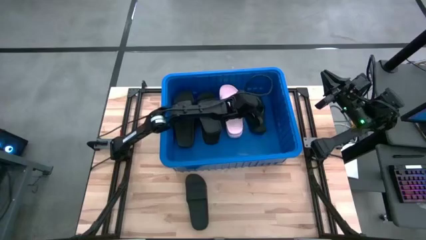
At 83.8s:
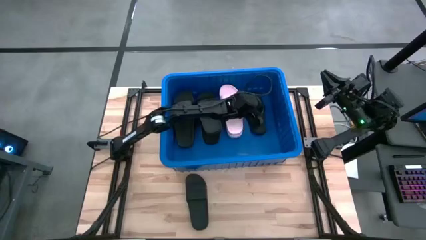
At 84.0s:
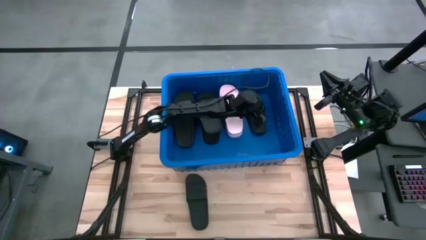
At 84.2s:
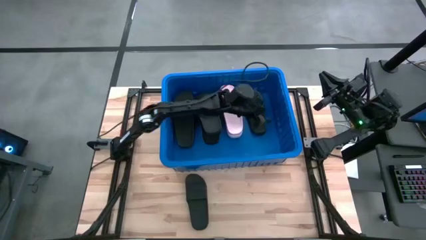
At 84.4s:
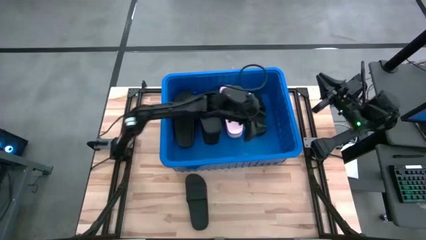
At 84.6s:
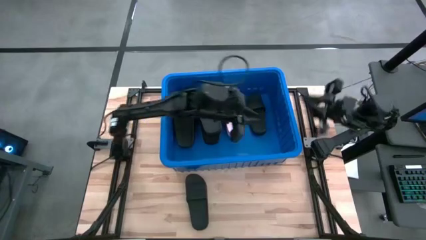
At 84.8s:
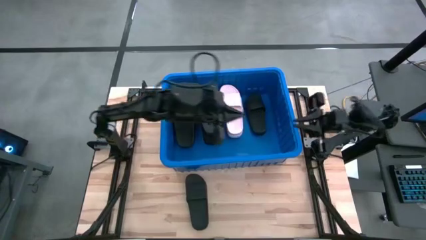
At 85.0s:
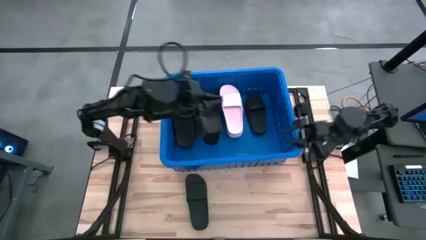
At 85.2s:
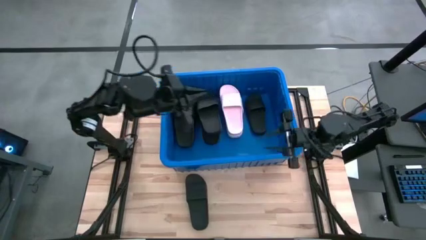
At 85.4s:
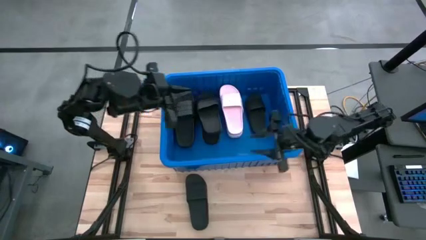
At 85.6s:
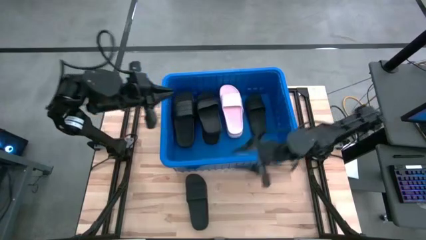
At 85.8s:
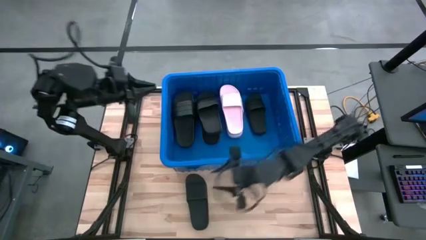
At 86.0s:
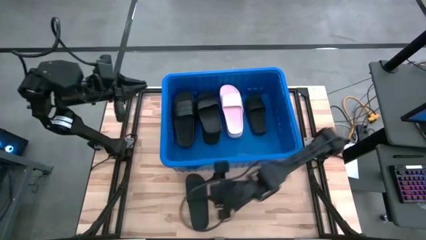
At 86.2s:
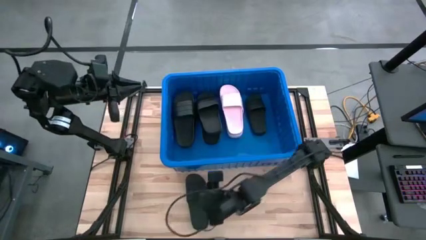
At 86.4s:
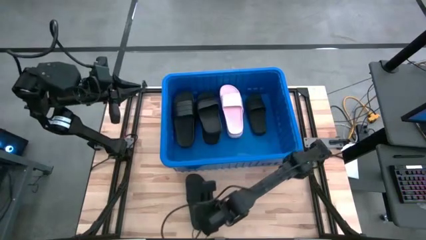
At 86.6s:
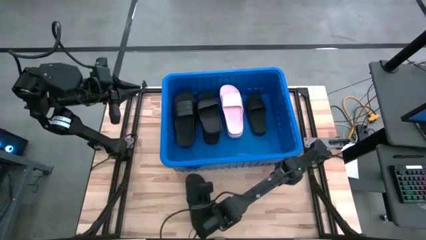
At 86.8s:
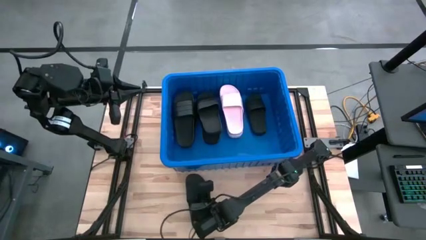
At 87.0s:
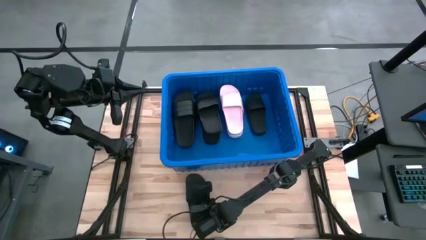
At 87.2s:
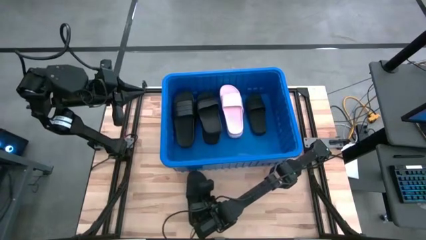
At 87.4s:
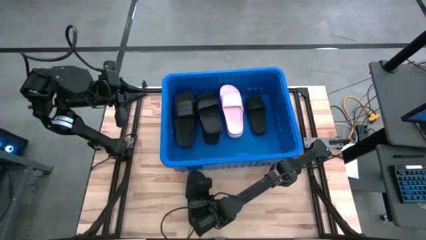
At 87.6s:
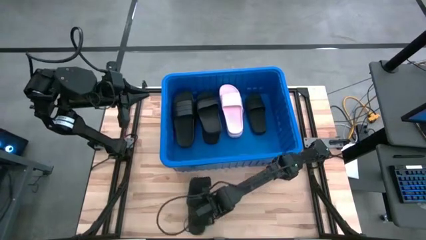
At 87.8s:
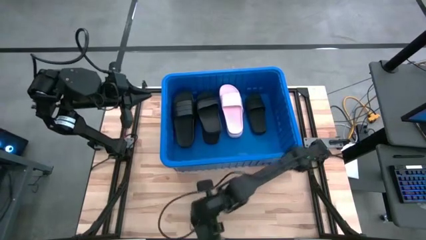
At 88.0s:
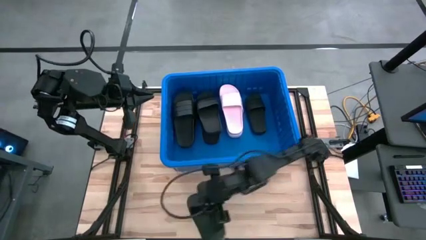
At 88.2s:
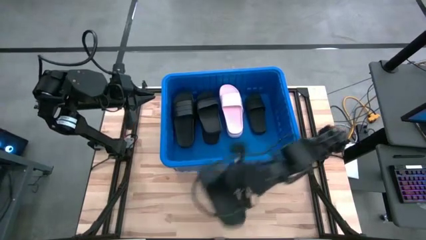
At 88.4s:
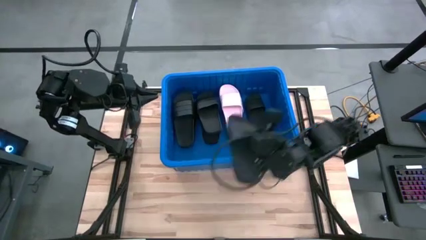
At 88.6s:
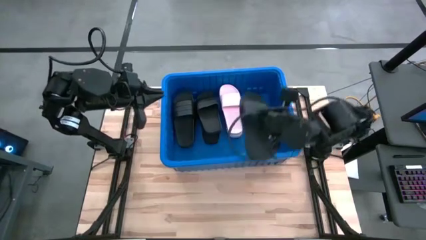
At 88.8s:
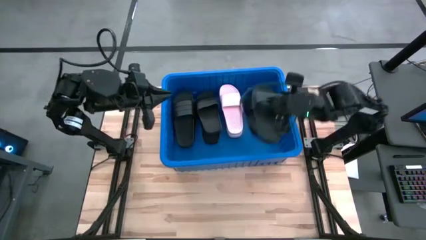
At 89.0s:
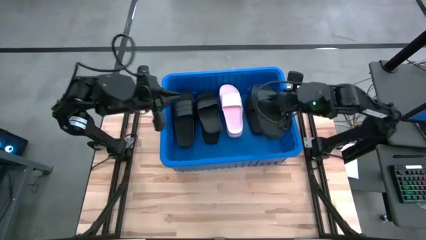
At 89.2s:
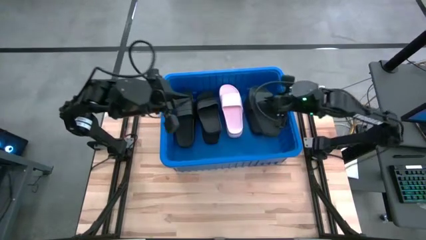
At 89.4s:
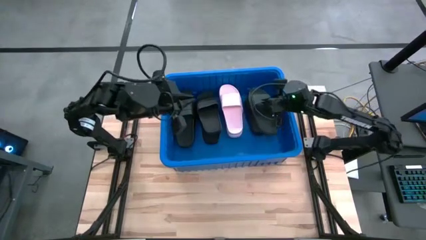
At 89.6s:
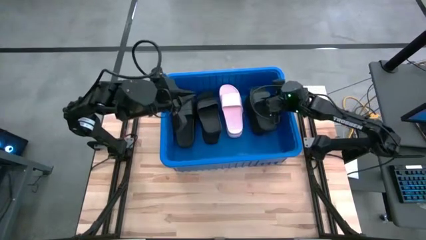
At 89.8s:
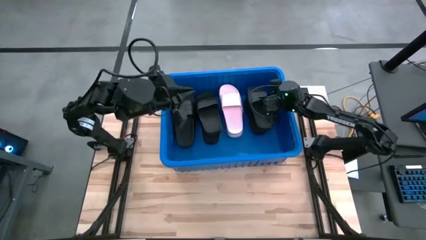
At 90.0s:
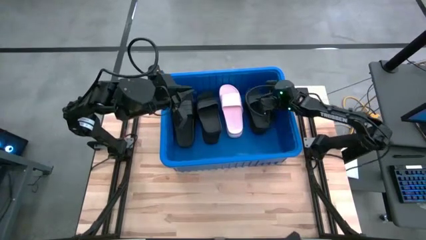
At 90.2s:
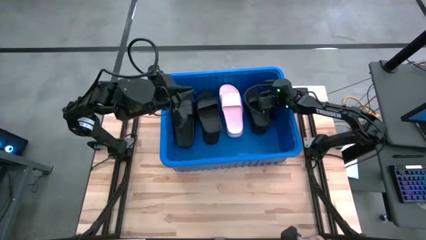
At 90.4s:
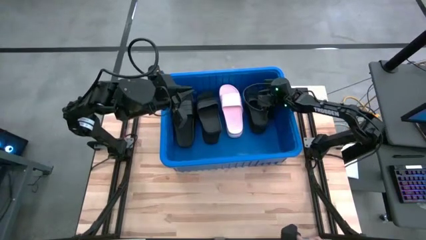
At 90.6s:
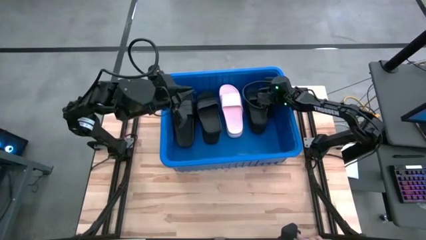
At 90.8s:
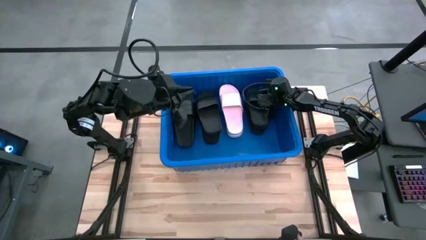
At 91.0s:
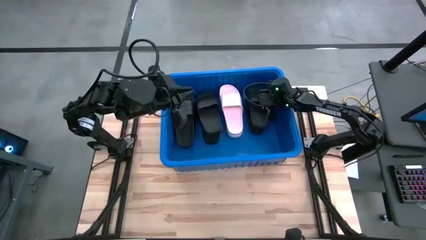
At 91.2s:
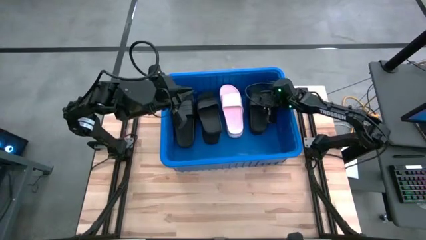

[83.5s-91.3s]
Task: Pick and place slides into bin
Put the black slide into the blue organizer bin

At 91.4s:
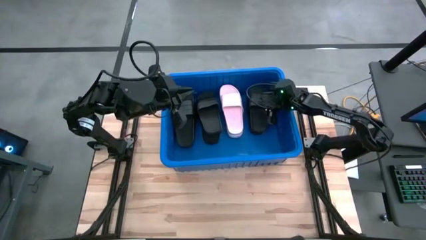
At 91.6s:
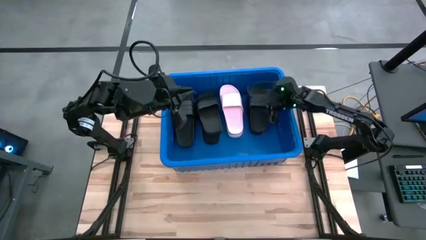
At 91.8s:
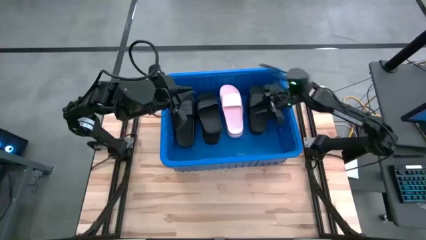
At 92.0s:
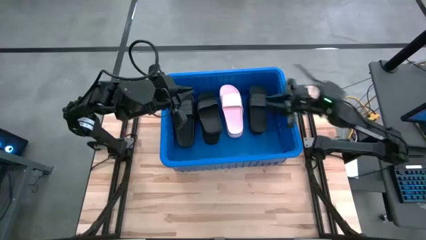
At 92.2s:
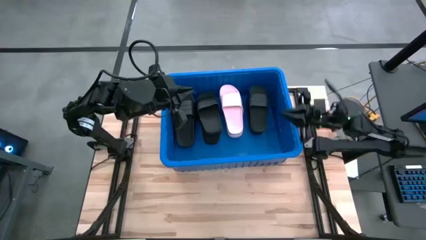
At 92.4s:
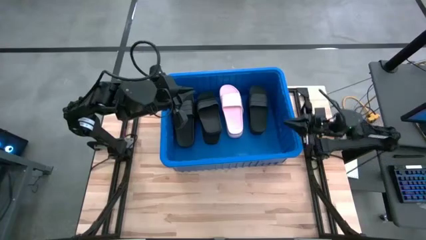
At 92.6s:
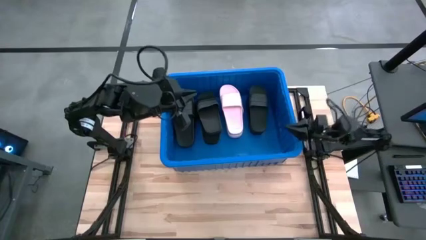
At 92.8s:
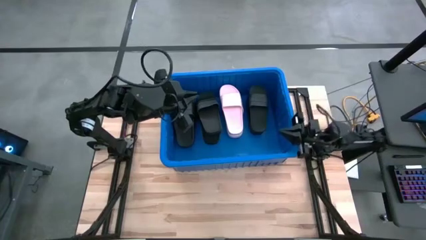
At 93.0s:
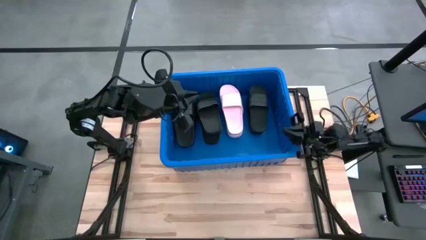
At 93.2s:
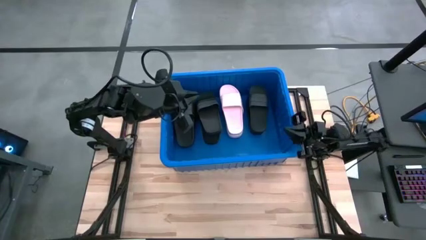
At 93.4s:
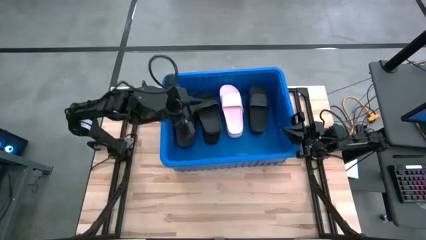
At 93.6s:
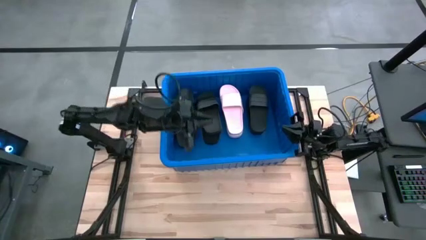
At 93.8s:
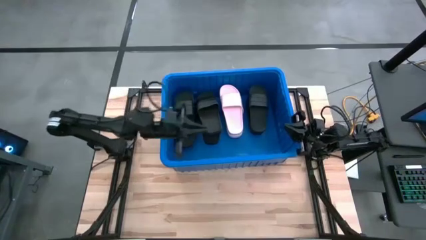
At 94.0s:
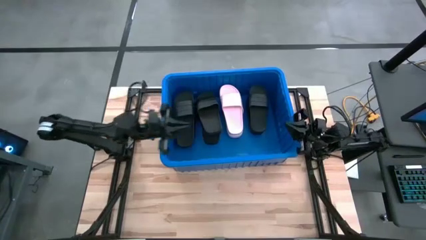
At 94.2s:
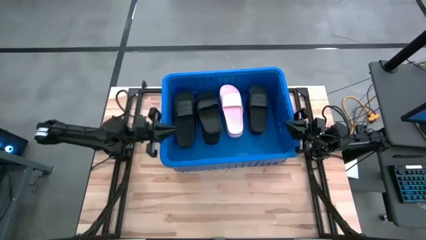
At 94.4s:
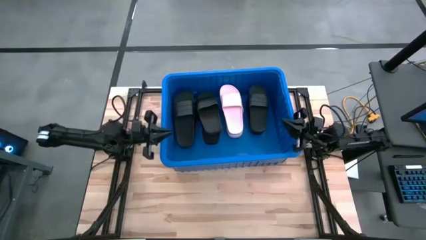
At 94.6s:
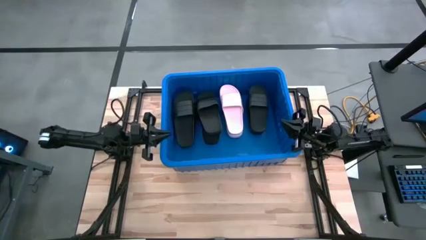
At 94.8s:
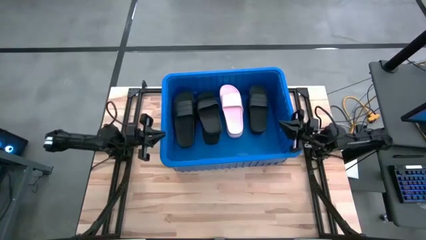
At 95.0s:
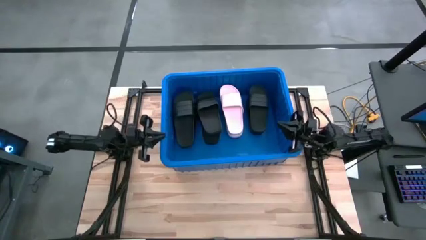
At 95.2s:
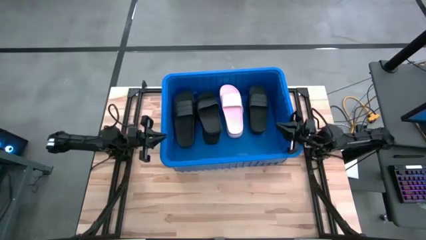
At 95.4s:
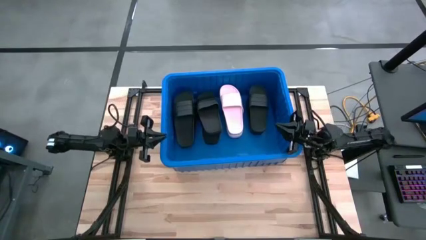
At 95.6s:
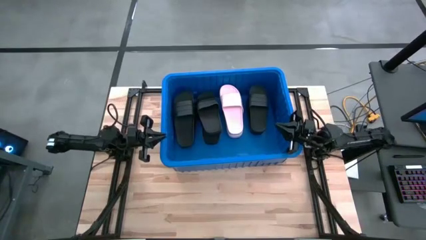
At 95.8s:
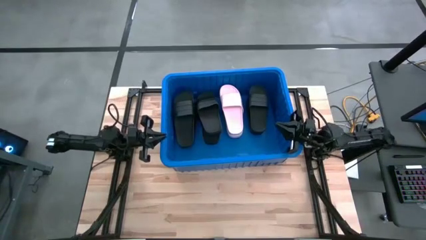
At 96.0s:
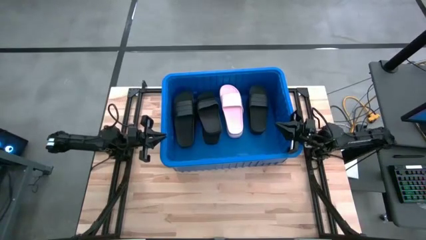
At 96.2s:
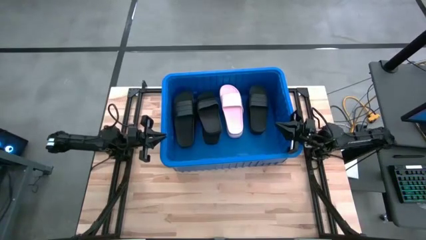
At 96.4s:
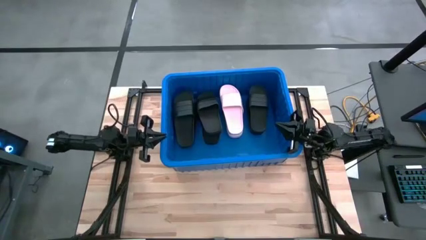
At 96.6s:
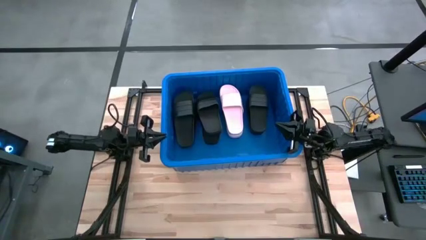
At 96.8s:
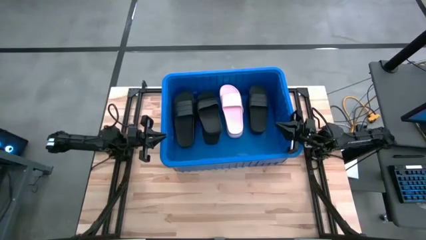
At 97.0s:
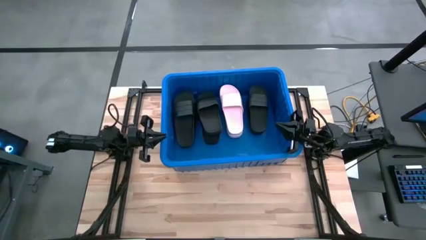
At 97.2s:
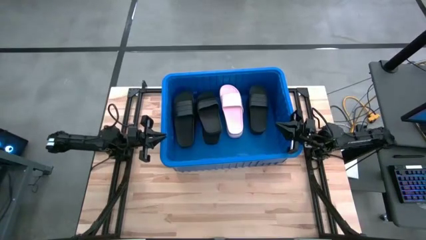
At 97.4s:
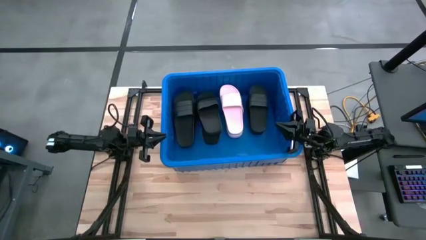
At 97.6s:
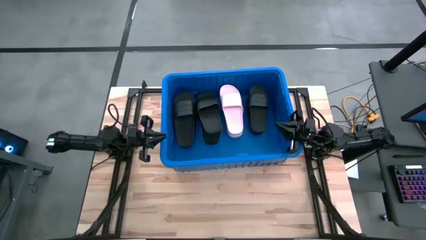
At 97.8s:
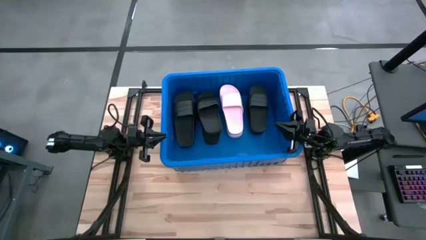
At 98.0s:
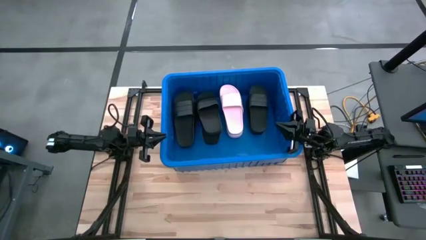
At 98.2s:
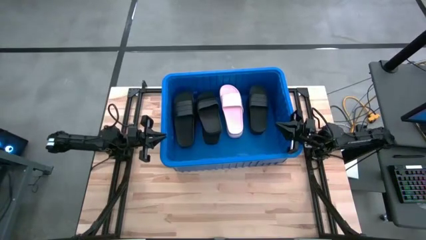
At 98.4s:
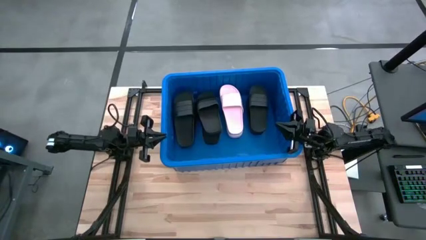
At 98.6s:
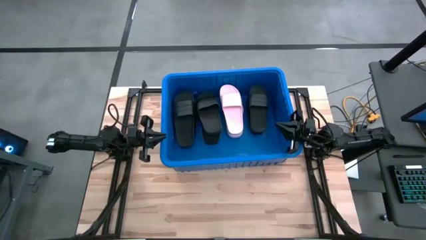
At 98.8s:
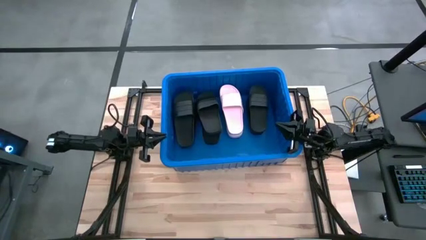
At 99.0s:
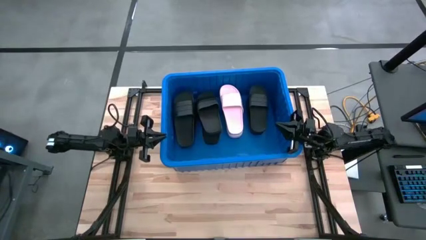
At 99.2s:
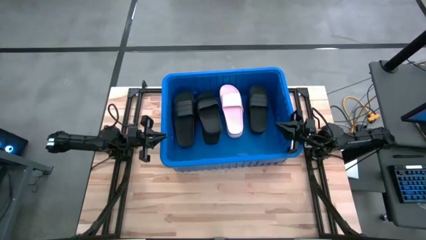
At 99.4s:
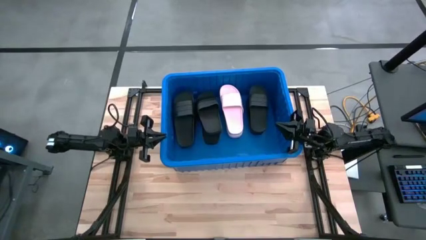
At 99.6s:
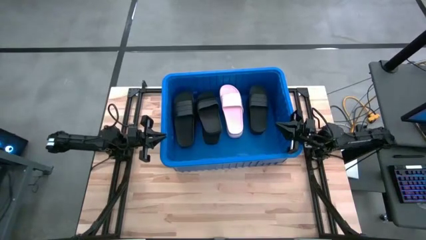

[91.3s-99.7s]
Return to Home Position
